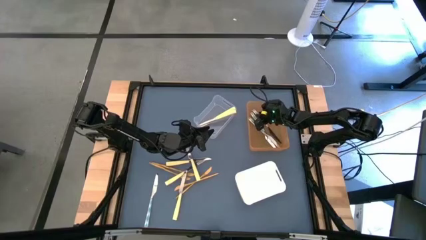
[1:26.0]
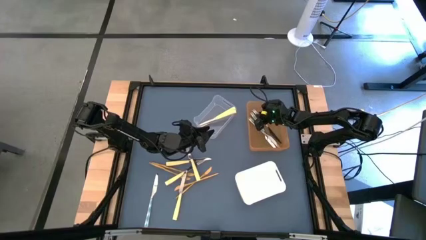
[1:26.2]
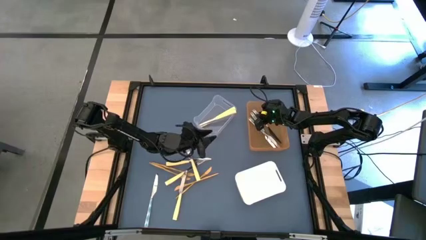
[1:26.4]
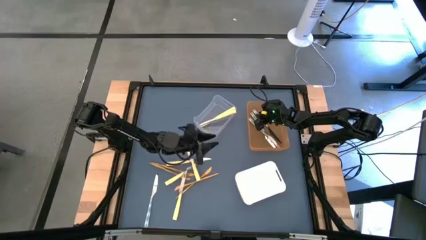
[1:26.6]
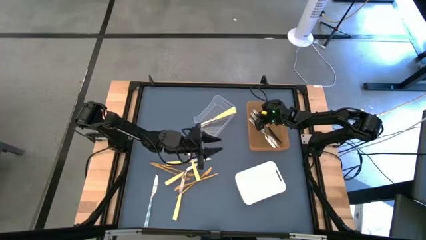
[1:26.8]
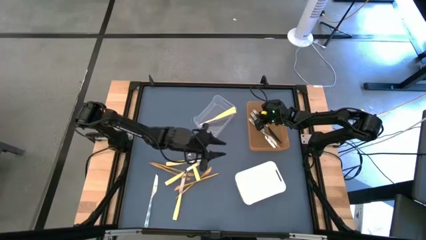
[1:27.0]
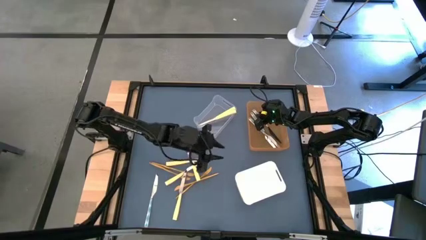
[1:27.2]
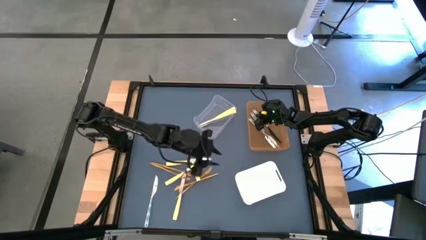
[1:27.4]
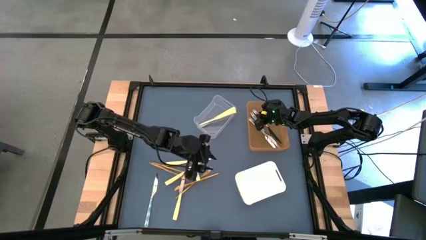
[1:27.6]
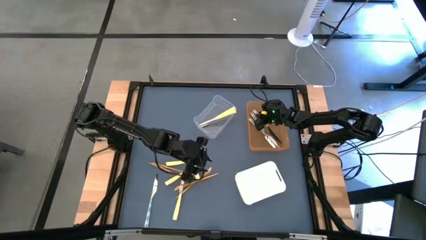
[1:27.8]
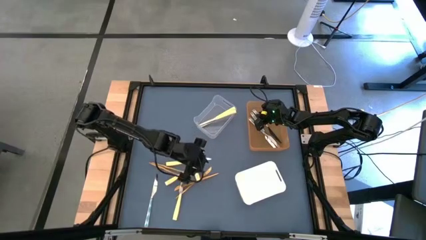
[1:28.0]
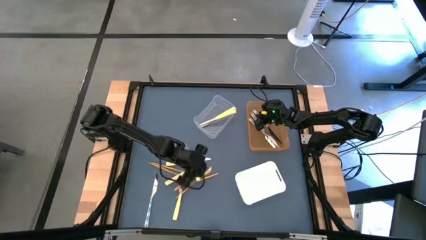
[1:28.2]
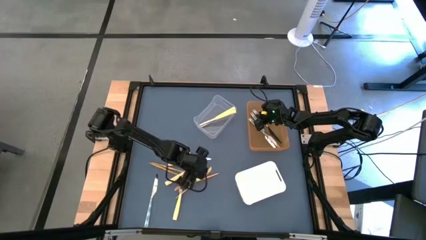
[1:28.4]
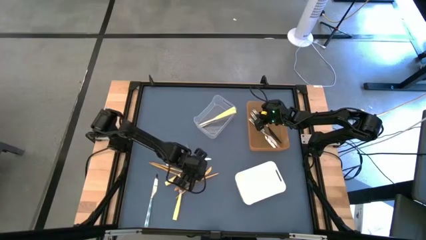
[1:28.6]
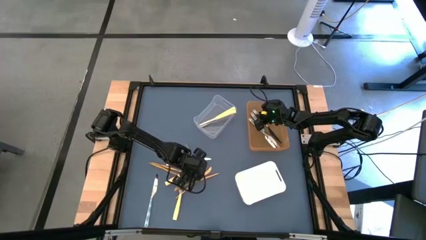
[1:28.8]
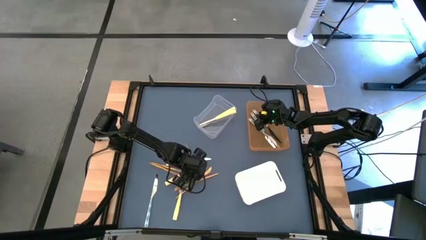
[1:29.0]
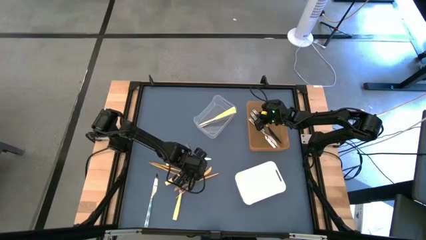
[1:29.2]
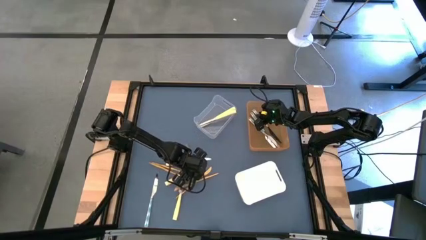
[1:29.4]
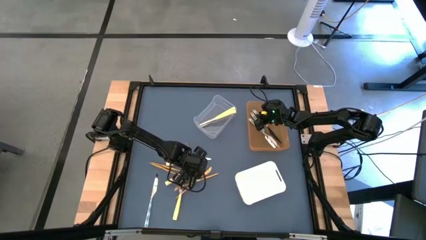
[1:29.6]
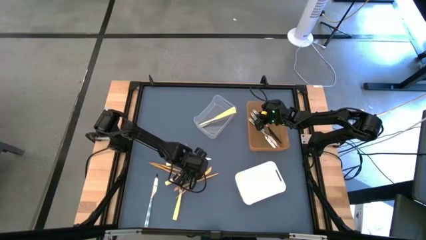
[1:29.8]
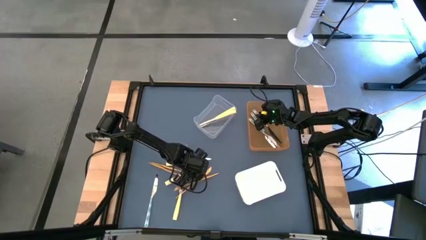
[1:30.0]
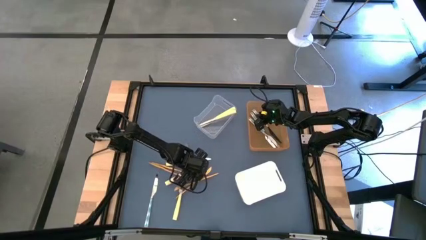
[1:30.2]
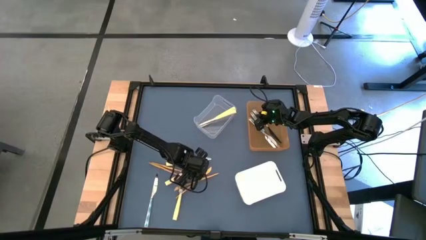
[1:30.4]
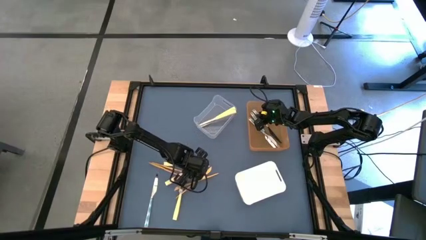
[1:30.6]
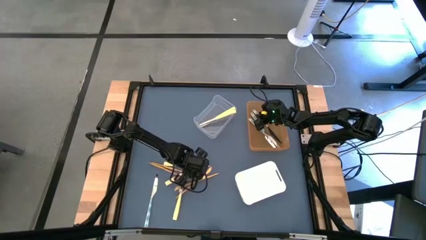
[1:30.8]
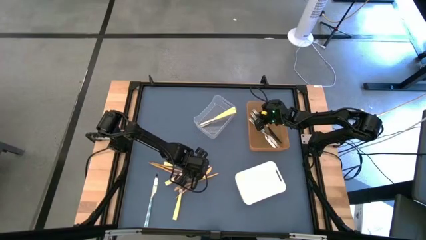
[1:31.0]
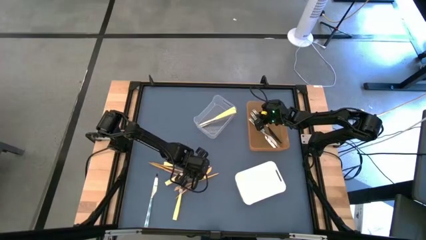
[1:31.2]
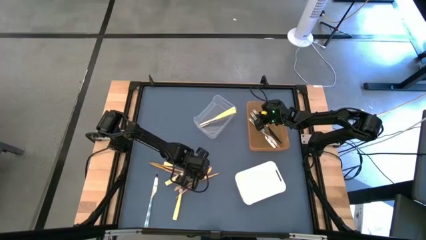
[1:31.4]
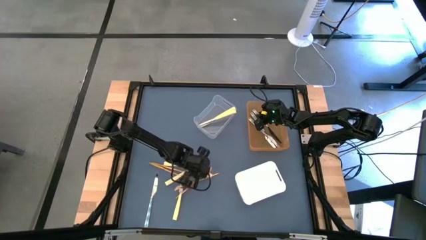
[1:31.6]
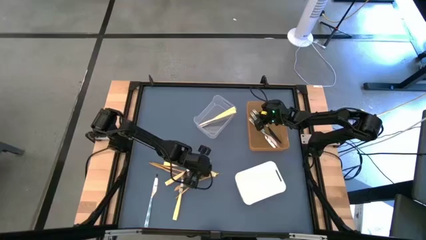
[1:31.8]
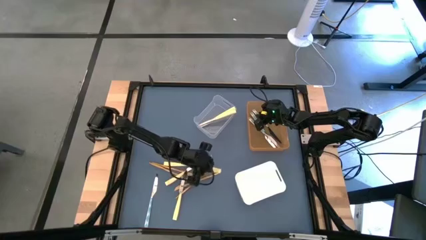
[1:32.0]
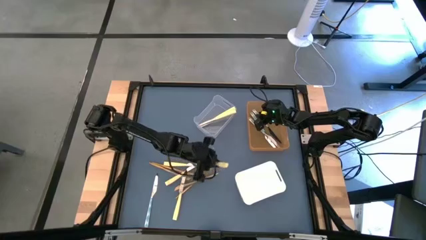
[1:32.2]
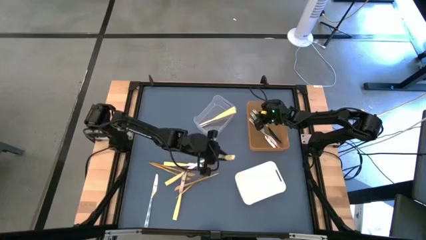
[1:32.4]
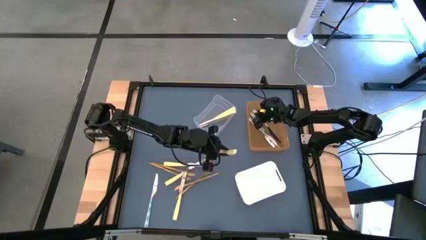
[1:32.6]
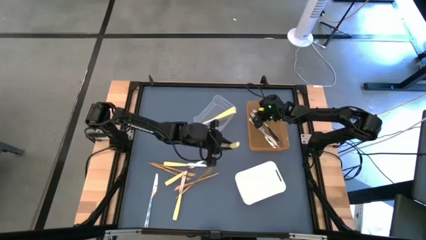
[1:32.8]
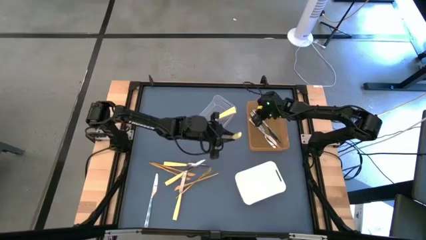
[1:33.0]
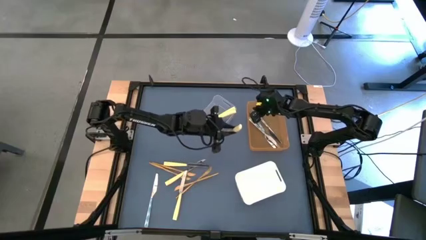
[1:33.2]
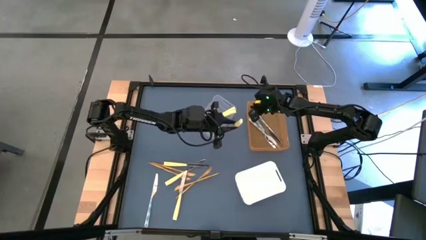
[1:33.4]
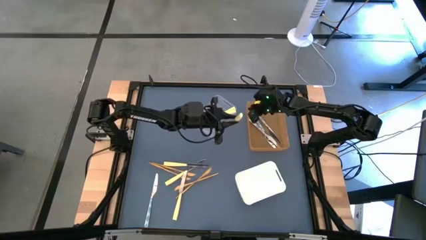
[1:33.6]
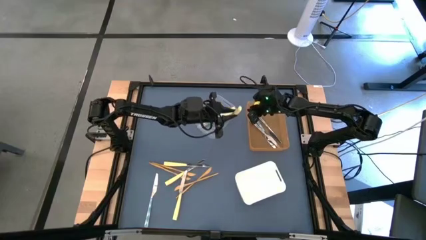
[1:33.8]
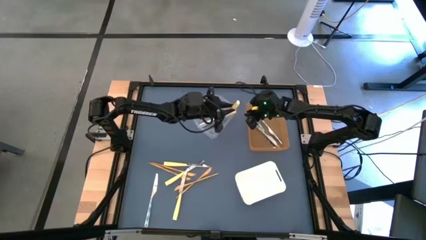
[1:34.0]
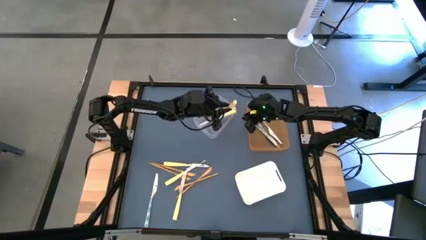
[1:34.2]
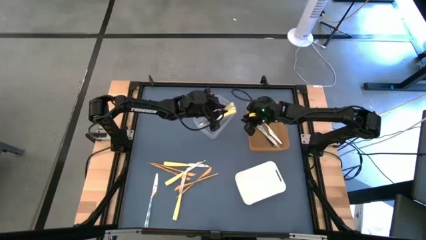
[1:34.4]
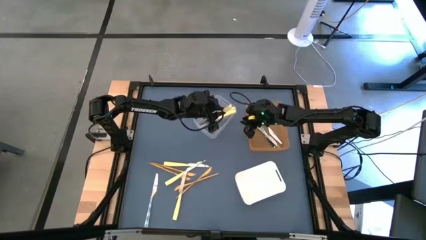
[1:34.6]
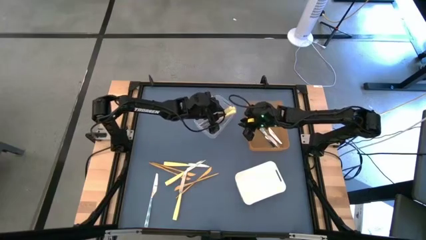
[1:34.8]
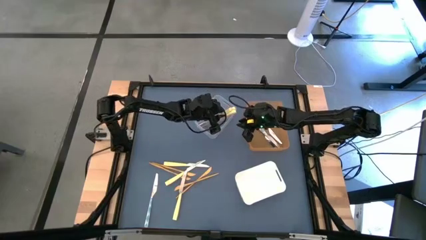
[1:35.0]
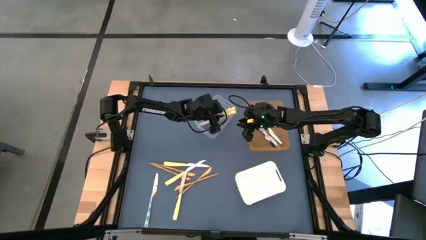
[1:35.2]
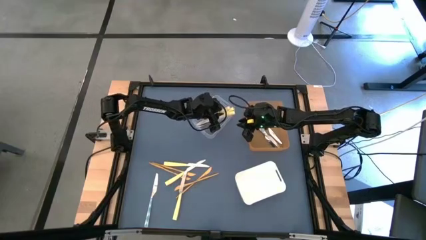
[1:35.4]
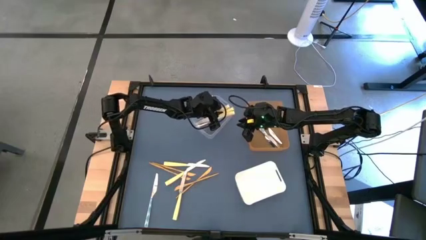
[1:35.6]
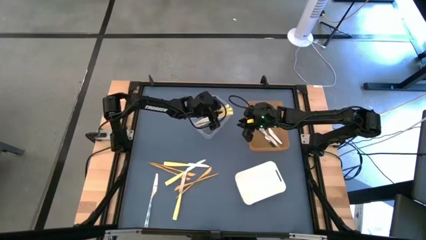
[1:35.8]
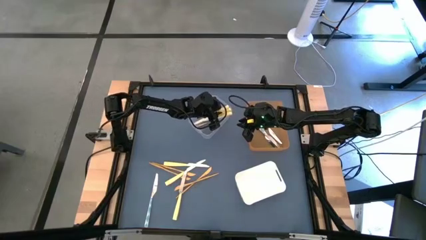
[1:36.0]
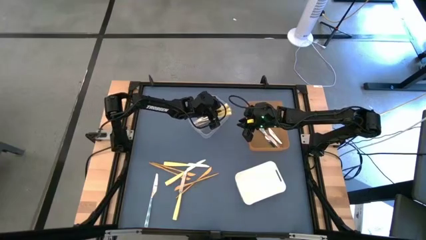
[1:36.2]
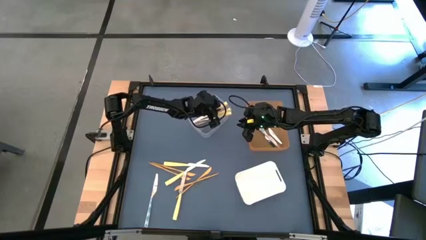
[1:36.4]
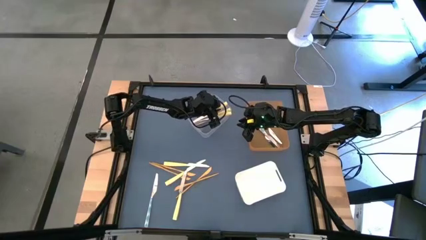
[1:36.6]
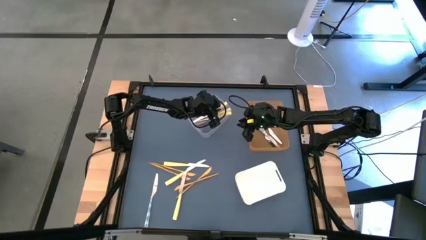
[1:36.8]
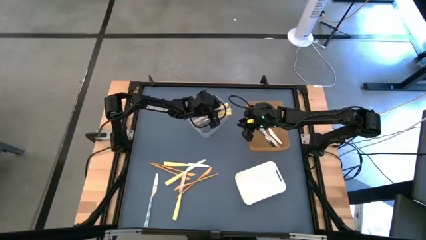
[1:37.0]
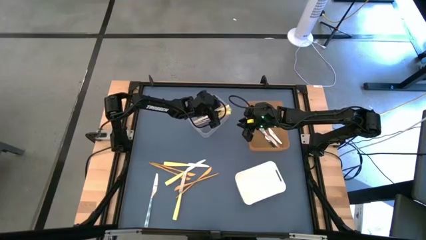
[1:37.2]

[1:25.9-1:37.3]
Task: Sort silverware by color (type)
Put the yellow knife into the transparent bin
